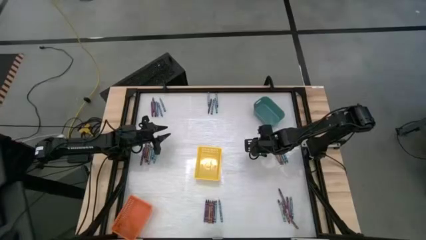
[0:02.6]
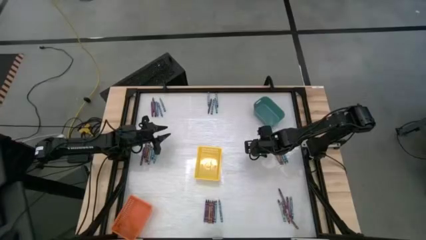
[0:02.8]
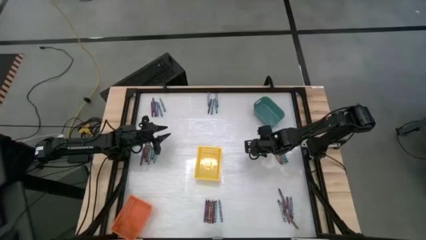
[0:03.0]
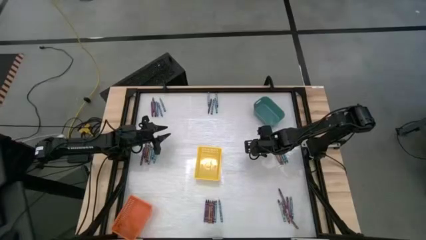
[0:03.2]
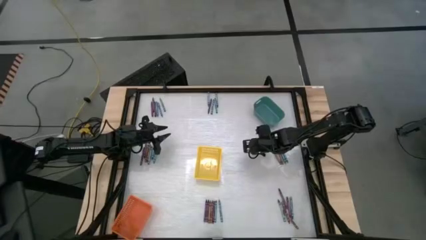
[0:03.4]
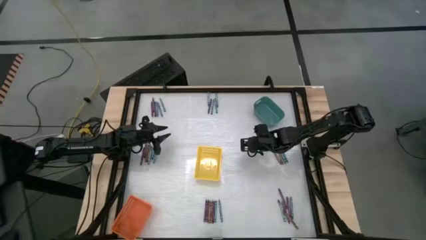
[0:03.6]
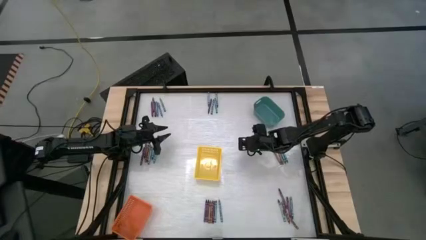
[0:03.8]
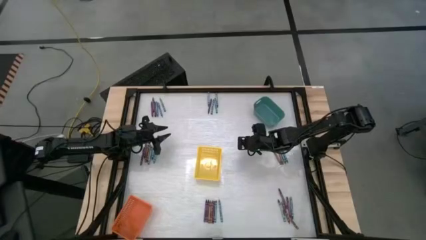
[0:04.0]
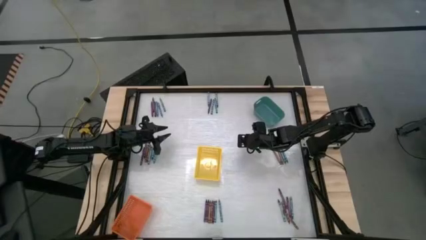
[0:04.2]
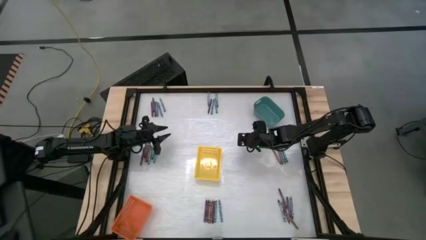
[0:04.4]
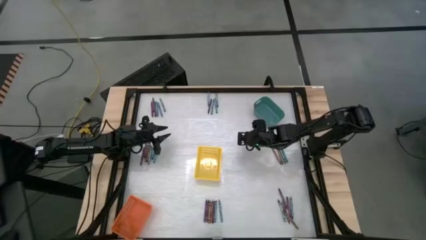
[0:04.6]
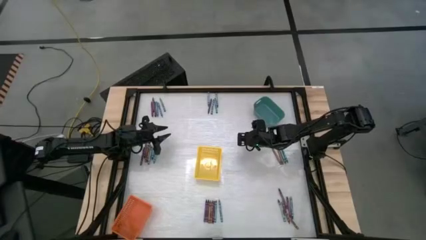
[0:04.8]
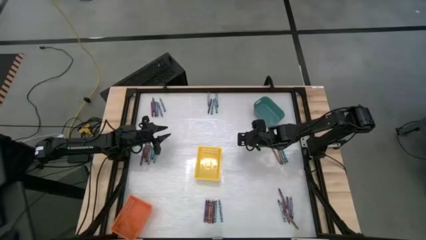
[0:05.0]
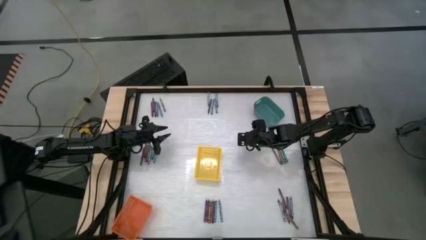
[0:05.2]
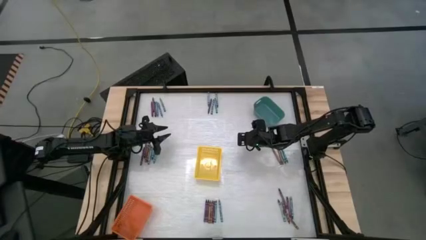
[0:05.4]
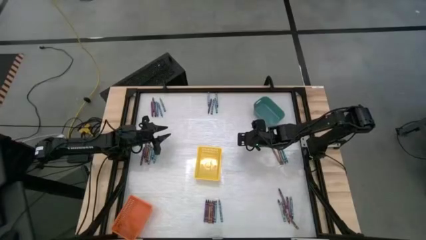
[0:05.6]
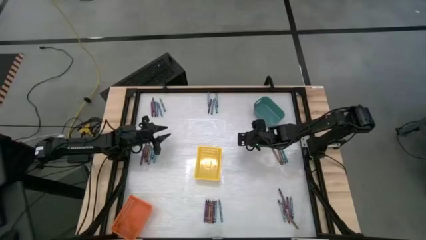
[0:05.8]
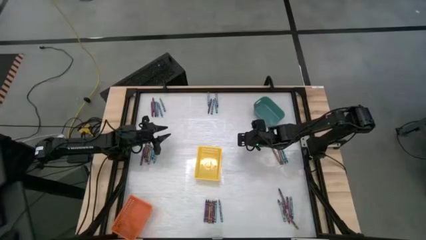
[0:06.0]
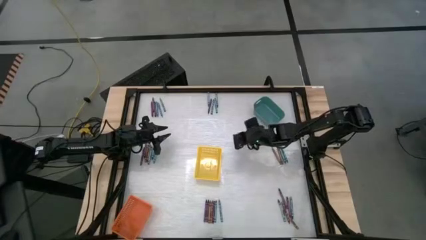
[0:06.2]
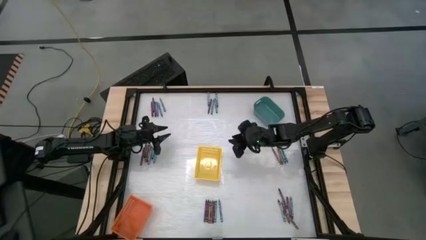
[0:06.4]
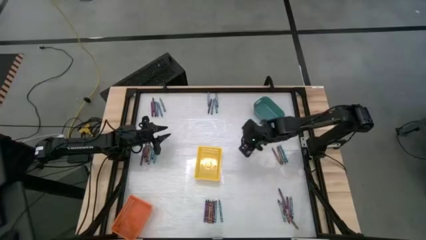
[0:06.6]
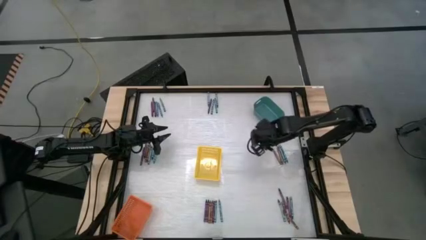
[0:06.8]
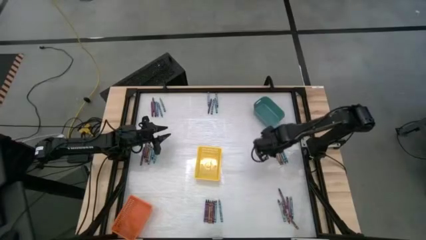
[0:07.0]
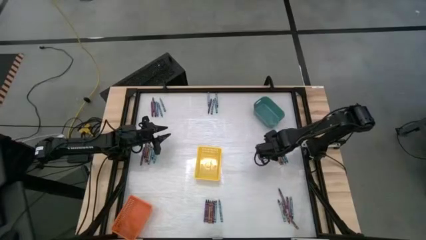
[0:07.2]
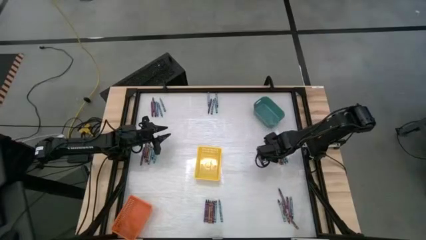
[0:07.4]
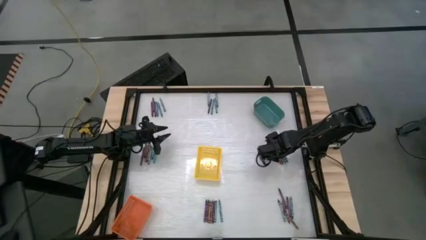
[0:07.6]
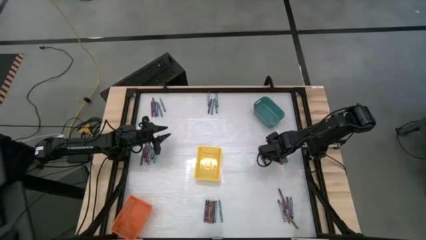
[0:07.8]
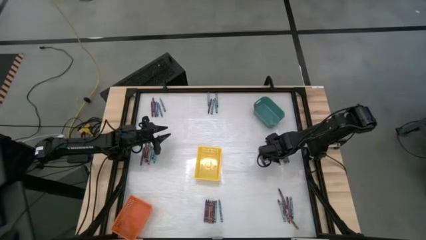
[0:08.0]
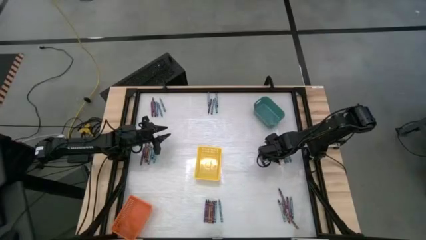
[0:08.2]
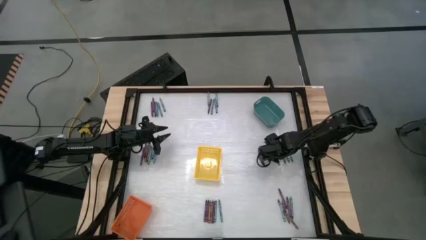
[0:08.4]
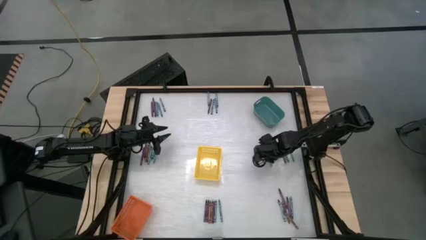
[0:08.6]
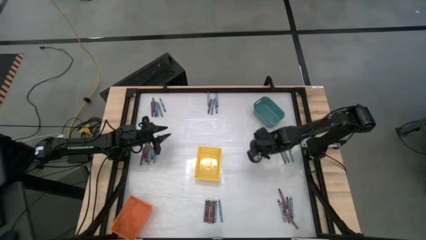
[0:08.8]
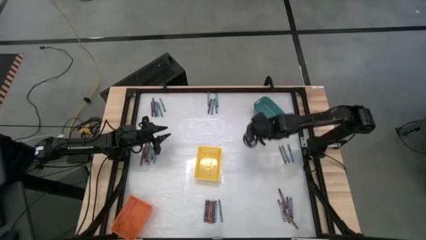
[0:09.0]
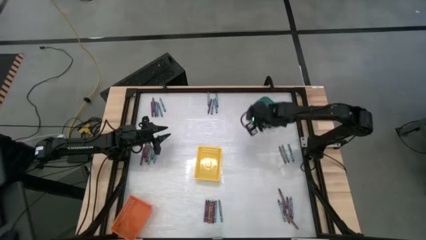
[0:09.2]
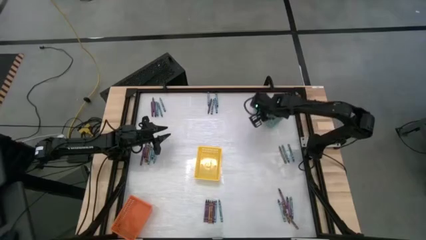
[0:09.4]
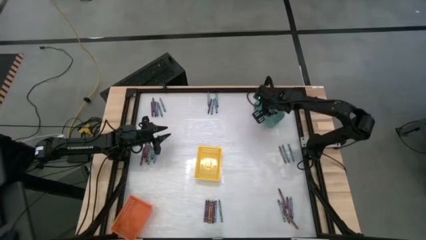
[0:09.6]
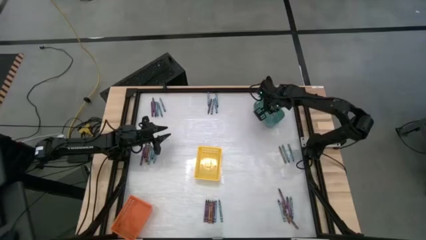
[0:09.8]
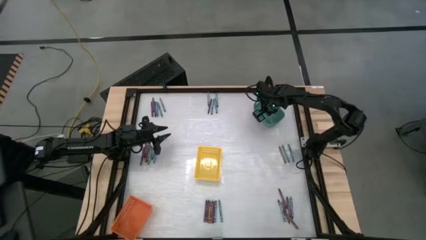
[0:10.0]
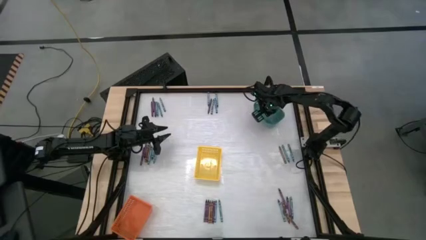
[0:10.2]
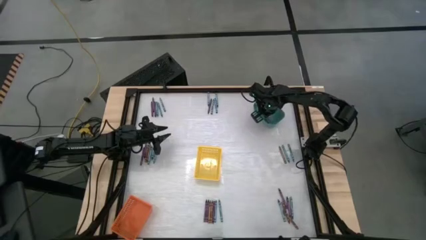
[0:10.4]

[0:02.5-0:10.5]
Task: Sort crayons
Put the brown crayon into the green bin

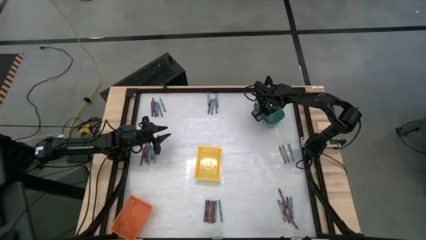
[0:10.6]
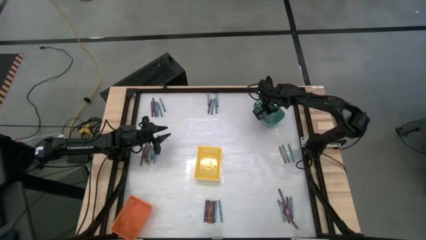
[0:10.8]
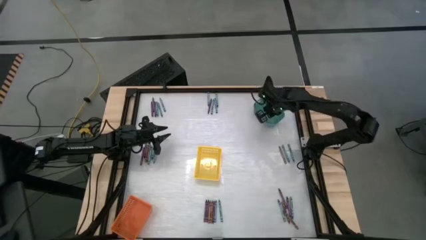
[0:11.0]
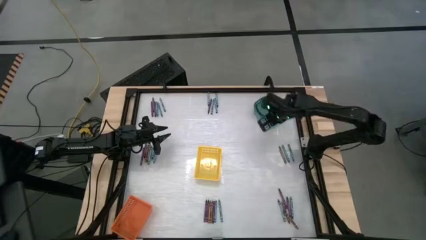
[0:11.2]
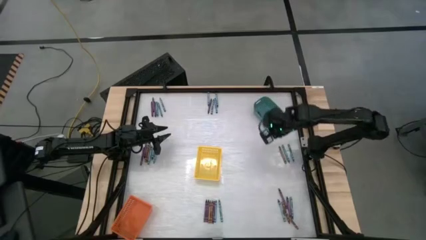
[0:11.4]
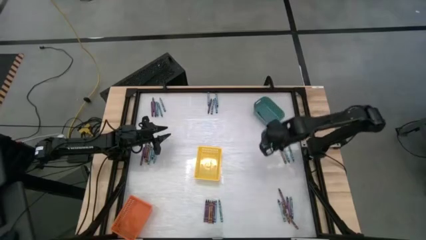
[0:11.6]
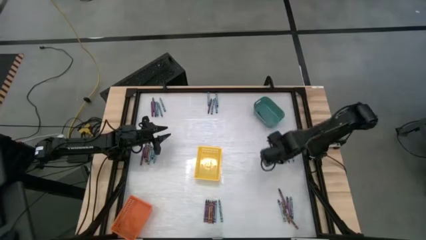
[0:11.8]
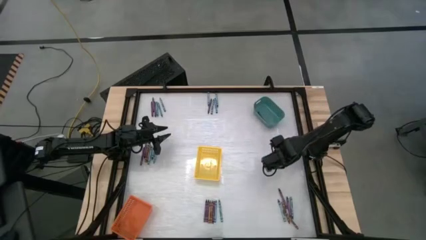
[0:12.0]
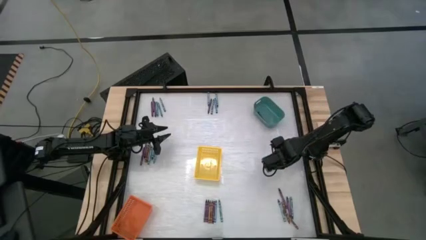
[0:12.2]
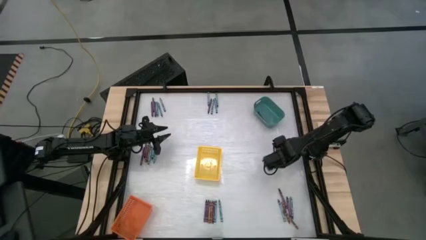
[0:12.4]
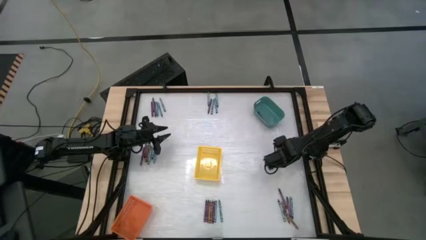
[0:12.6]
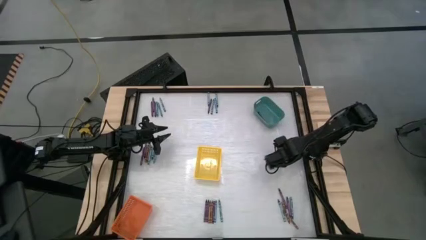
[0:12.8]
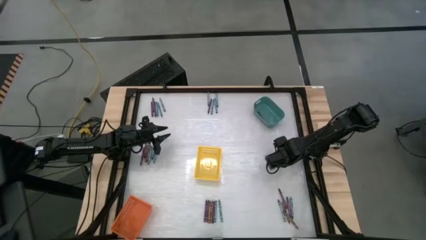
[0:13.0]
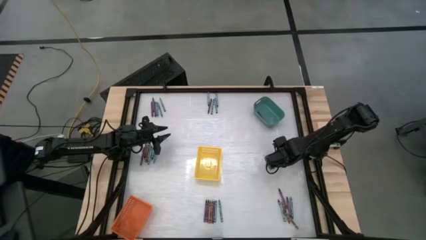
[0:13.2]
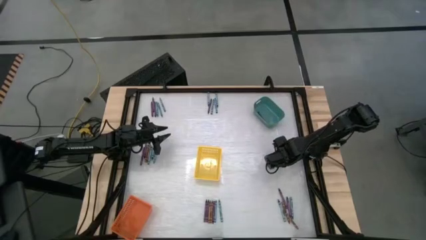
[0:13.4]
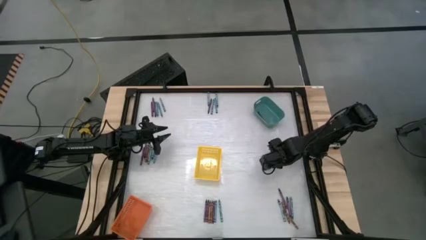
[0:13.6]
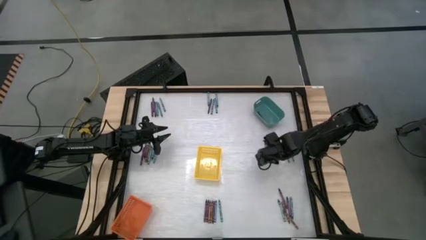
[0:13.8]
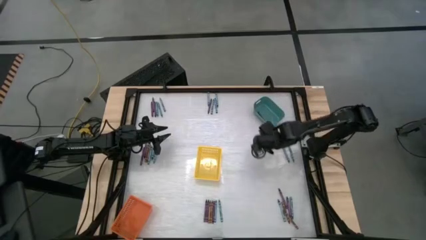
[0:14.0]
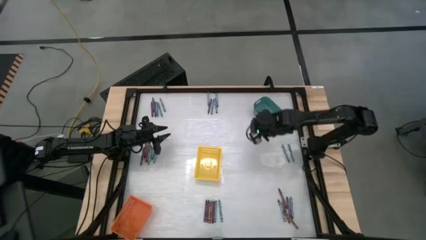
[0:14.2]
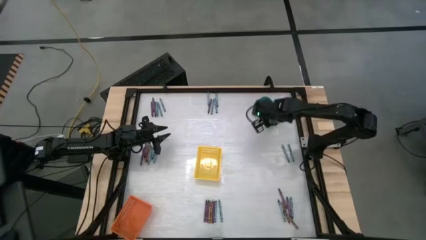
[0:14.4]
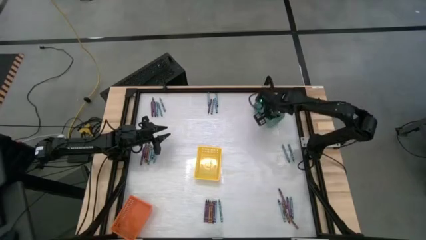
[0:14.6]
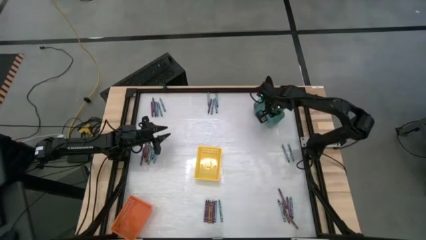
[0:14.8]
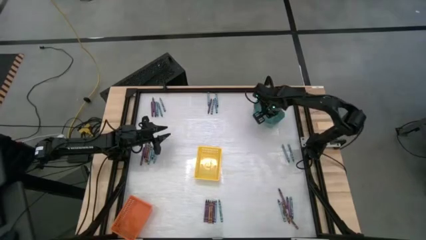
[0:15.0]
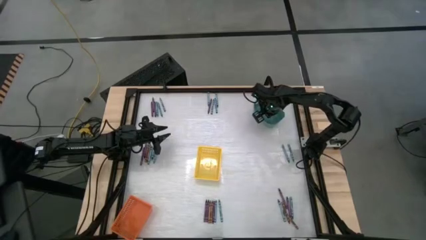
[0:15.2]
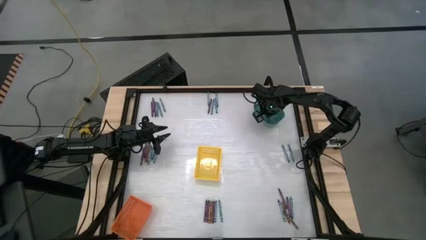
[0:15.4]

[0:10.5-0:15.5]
Put the brown crayon into the green bin

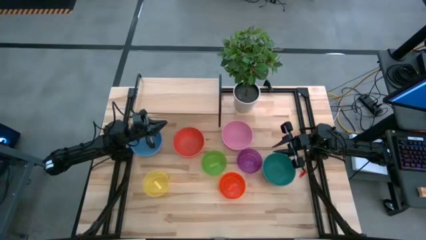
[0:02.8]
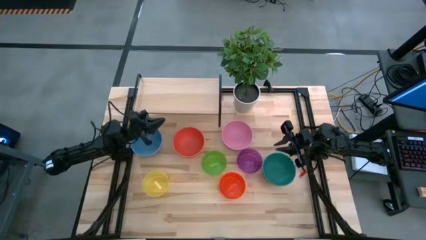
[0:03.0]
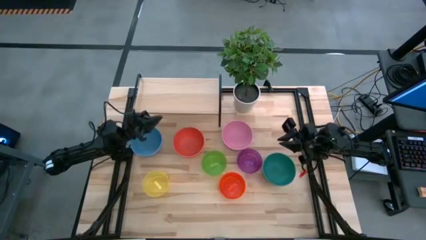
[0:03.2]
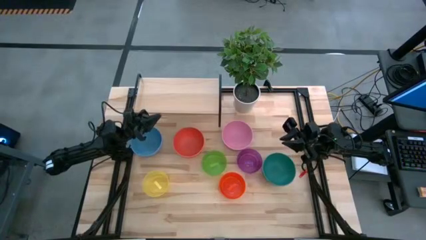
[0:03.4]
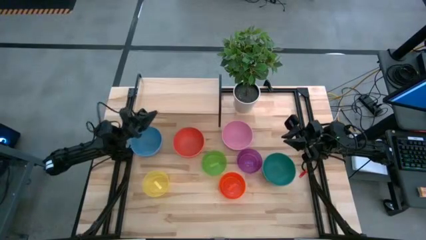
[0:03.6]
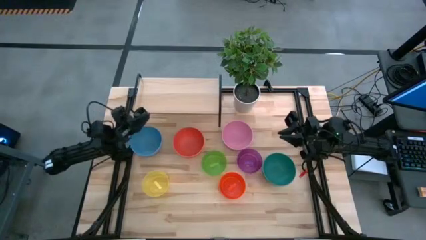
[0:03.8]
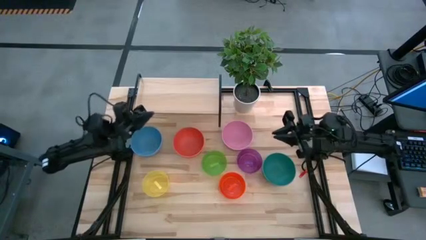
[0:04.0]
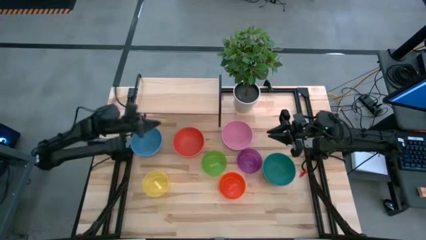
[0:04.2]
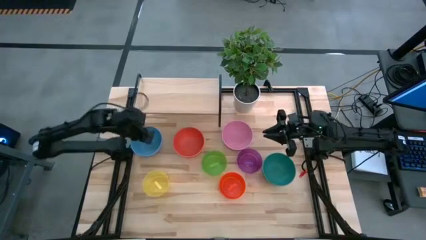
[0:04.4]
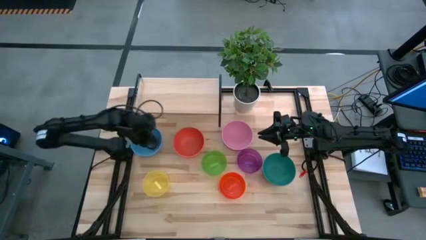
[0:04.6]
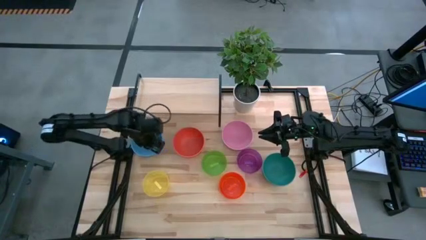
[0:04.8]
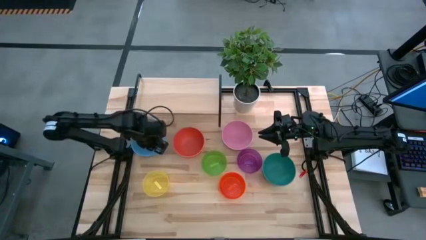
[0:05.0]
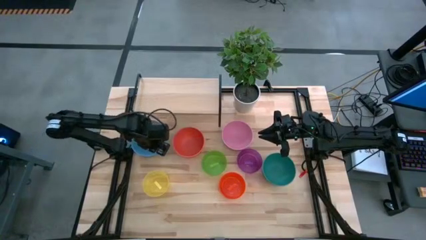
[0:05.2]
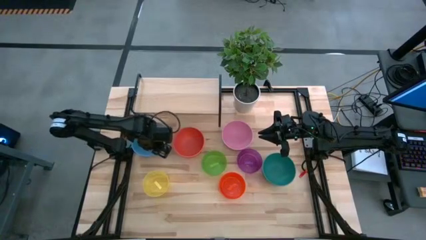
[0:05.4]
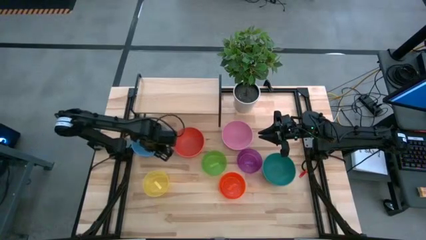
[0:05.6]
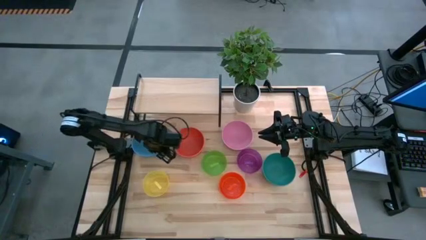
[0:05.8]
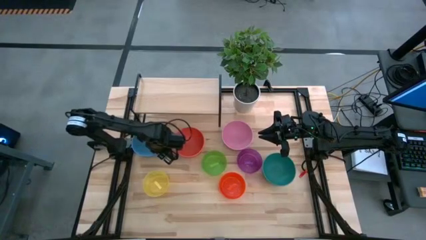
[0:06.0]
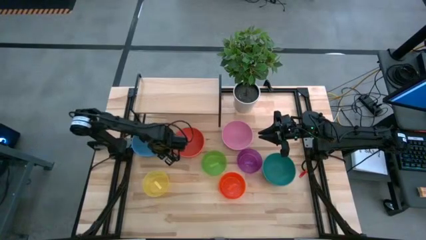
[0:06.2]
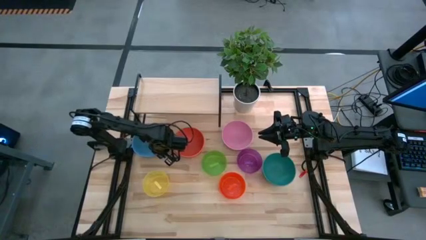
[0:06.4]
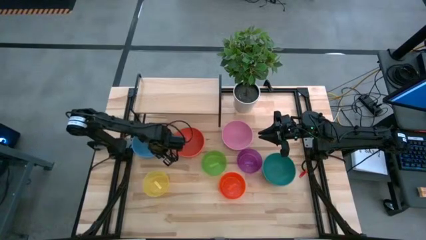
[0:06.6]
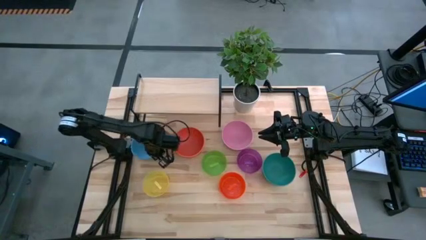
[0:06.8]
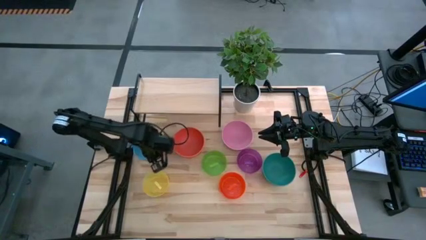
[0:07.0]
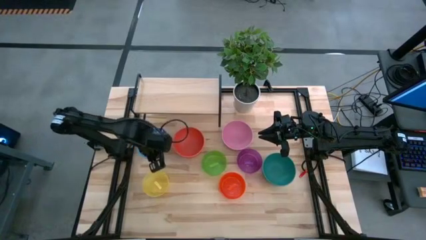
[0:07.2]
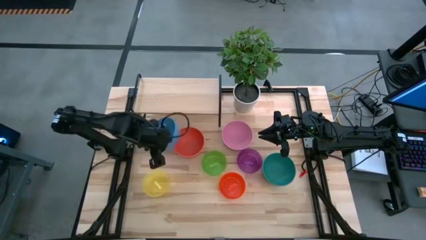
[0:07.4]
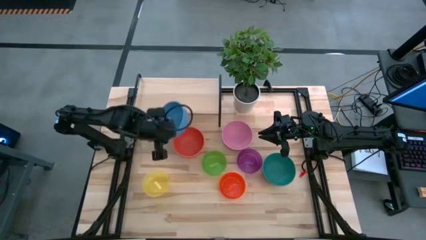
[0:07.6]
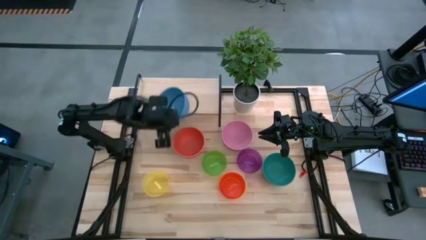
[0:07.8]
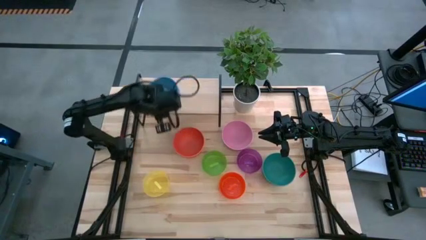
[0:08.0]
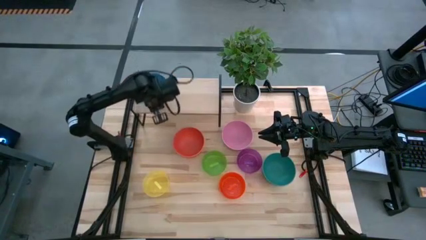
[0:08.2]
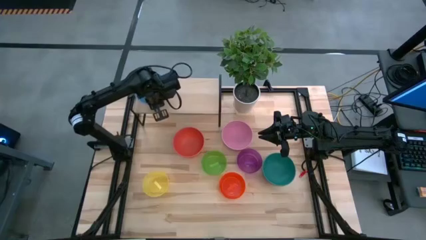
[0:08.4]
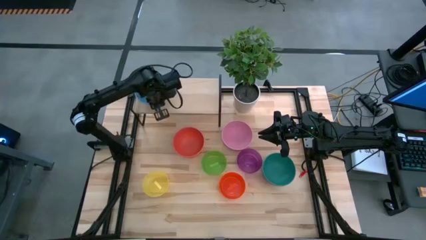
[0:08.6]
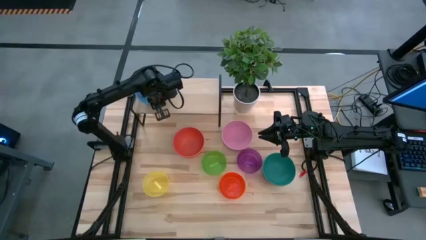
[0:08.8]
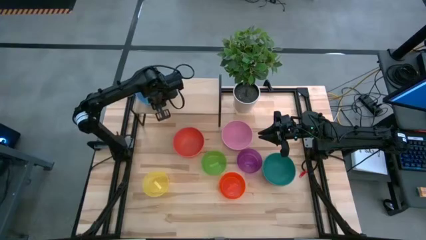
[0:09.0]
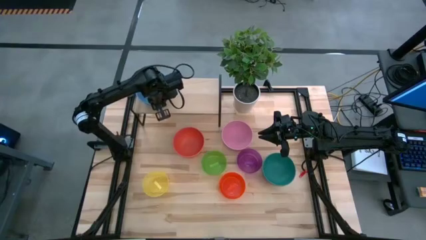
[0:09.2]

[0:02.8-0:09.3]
Task: Place and stack bowls onto a shelf
Put the blue bowl on the shelf
